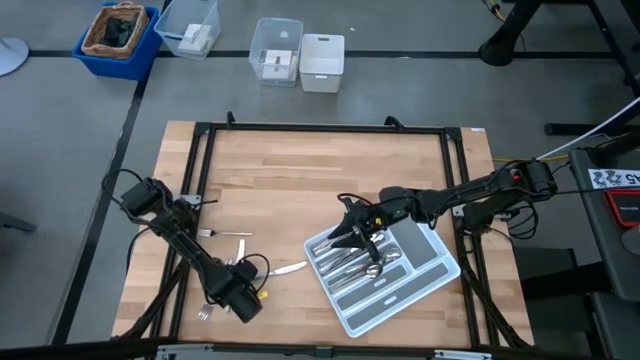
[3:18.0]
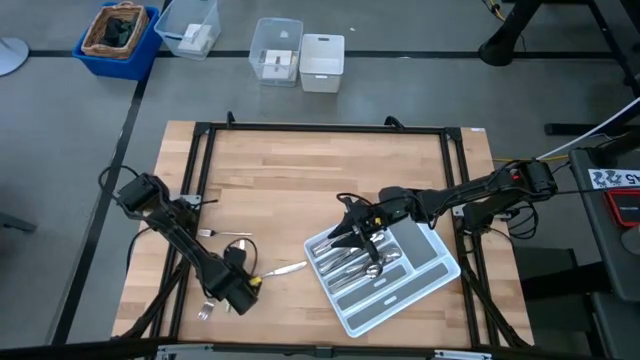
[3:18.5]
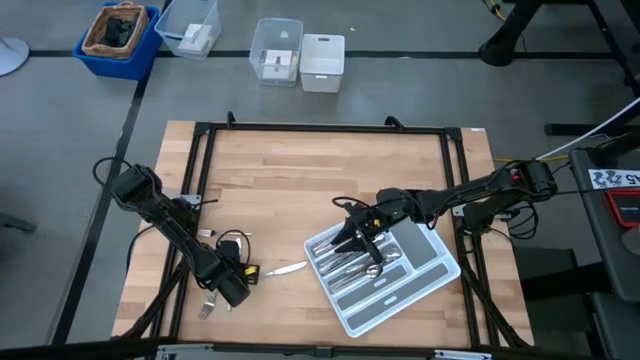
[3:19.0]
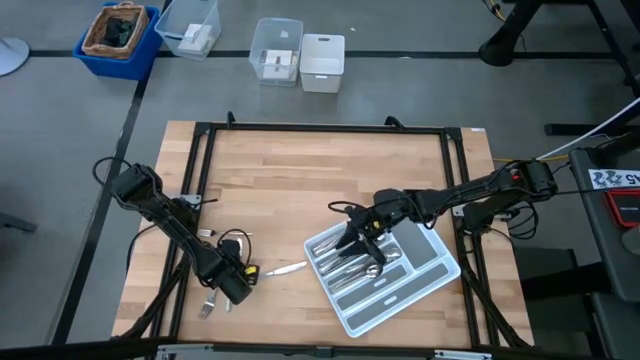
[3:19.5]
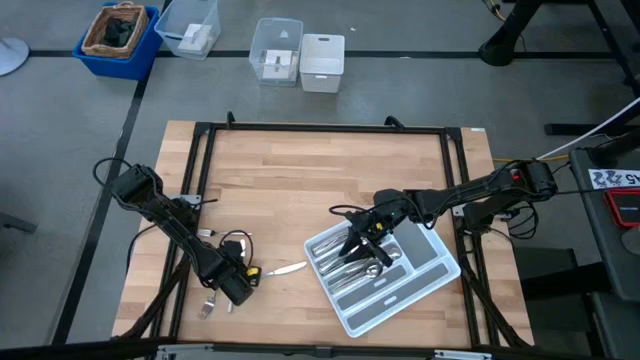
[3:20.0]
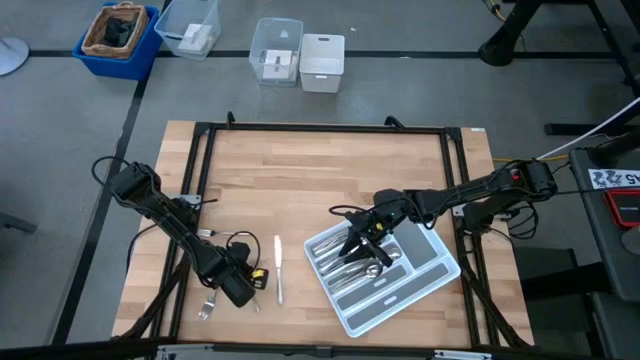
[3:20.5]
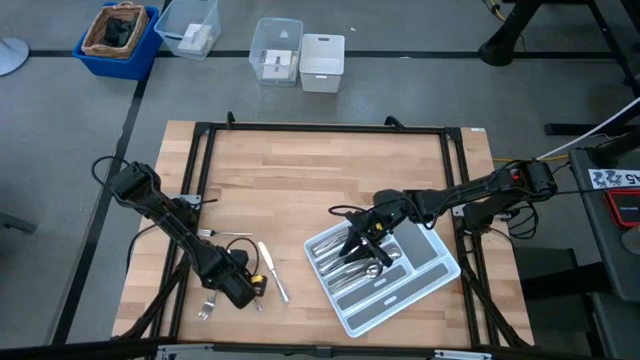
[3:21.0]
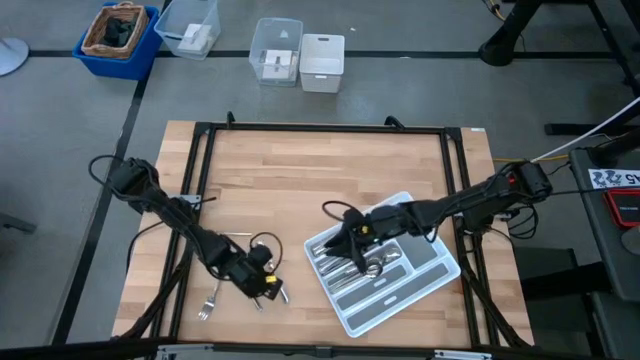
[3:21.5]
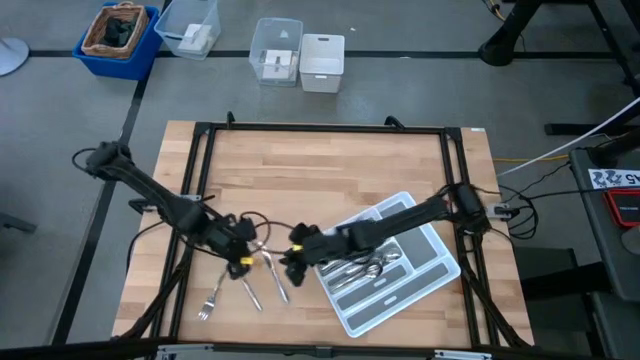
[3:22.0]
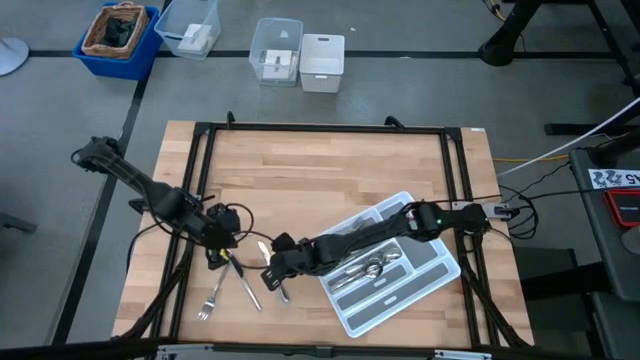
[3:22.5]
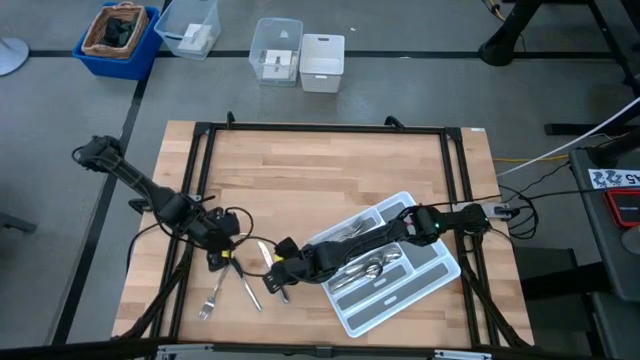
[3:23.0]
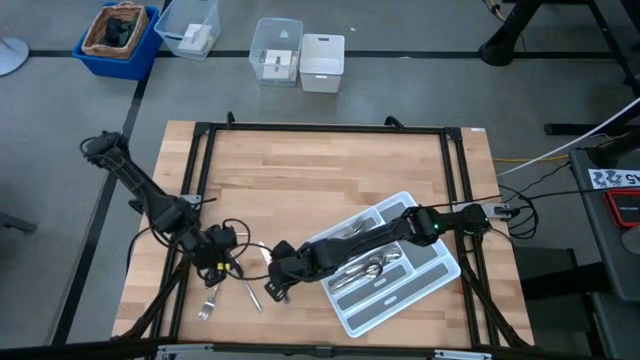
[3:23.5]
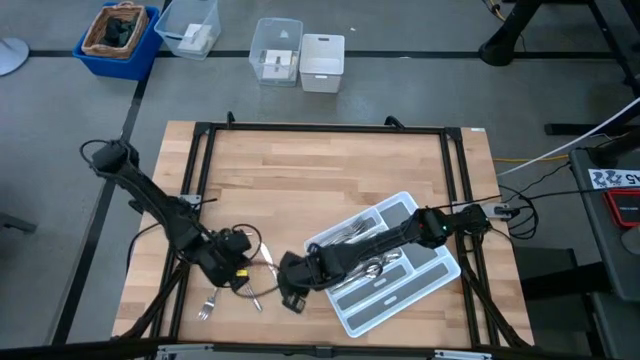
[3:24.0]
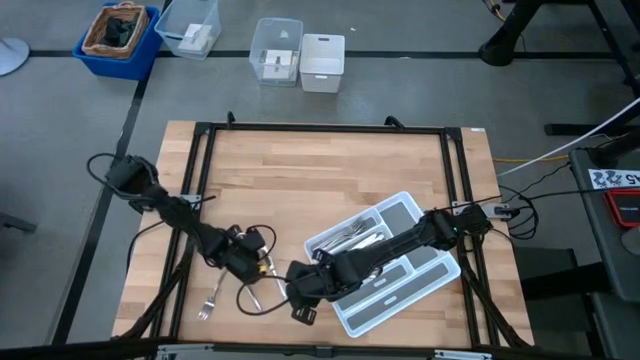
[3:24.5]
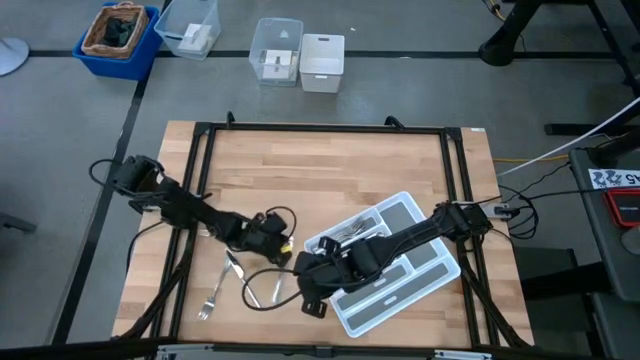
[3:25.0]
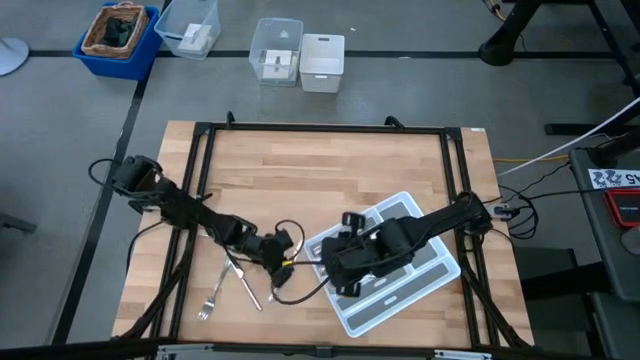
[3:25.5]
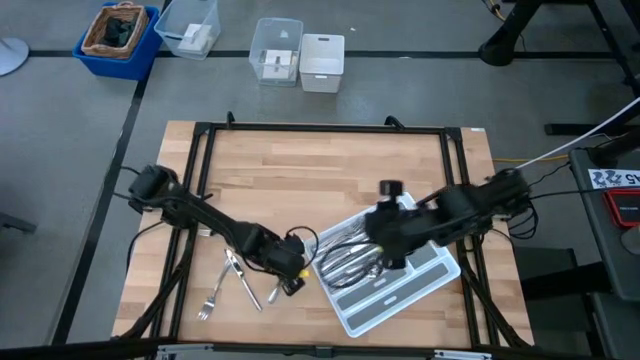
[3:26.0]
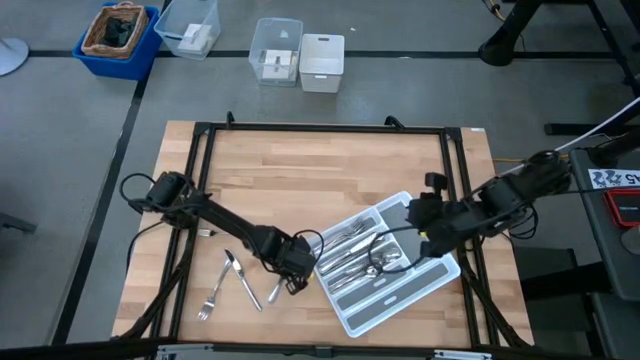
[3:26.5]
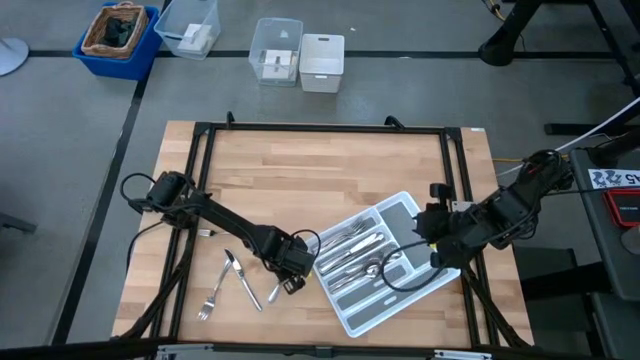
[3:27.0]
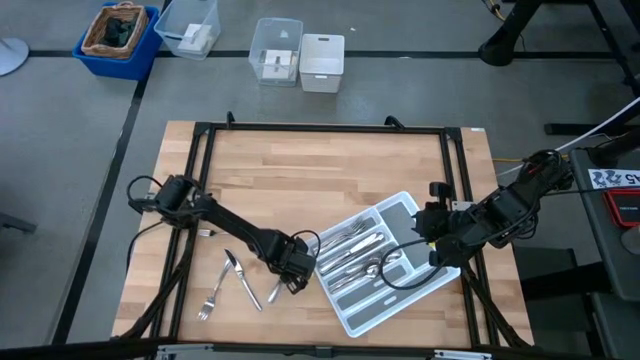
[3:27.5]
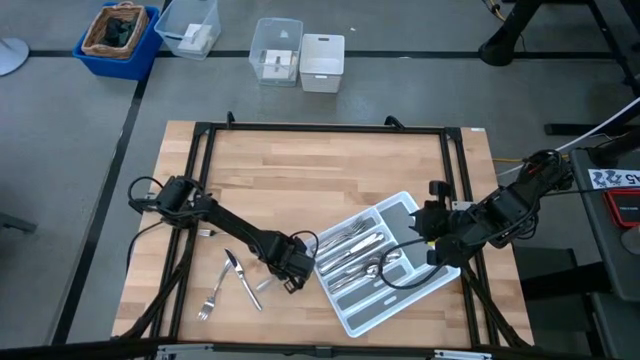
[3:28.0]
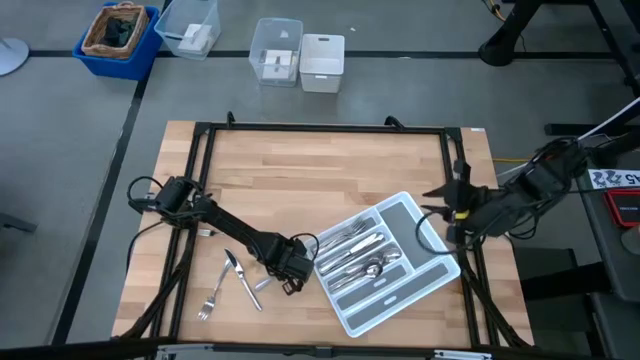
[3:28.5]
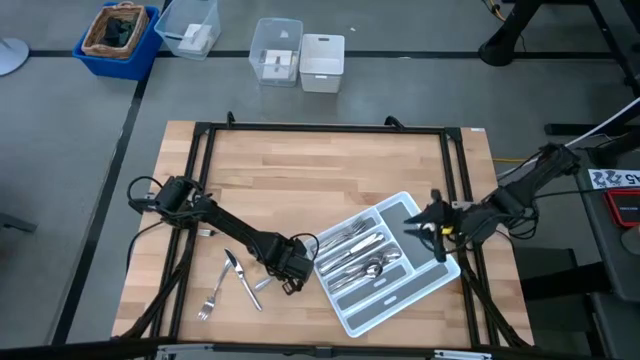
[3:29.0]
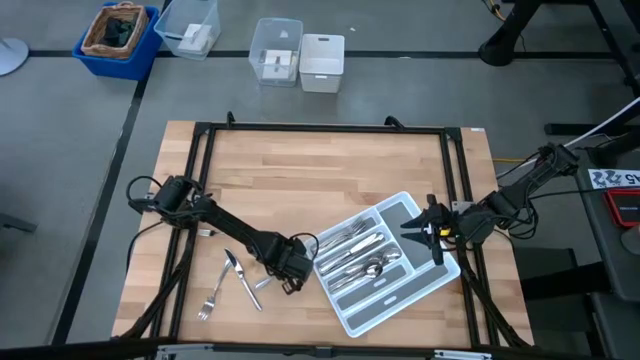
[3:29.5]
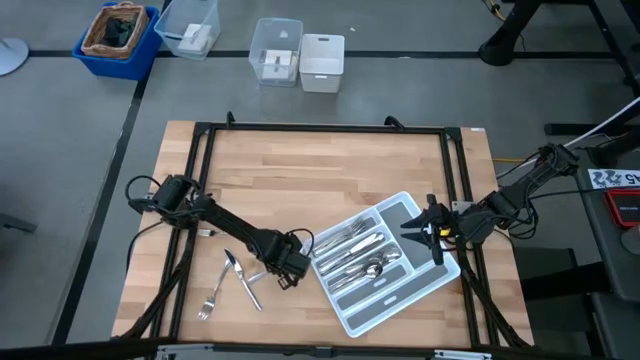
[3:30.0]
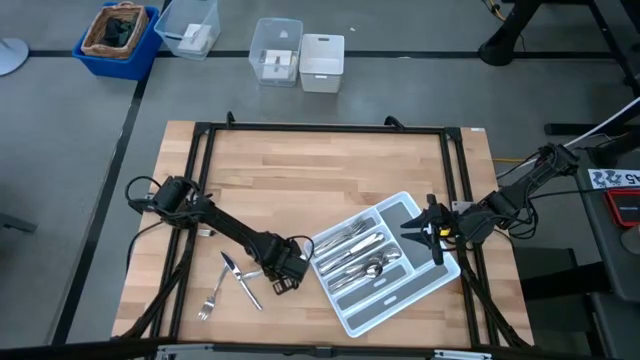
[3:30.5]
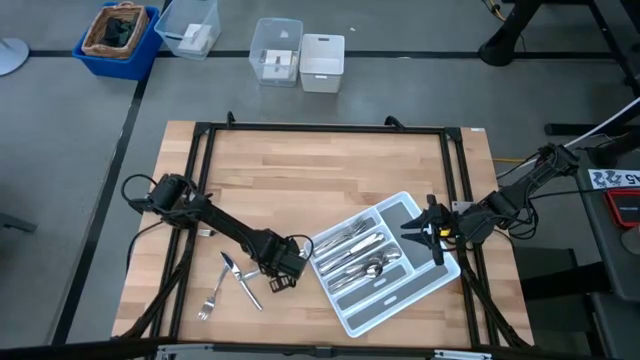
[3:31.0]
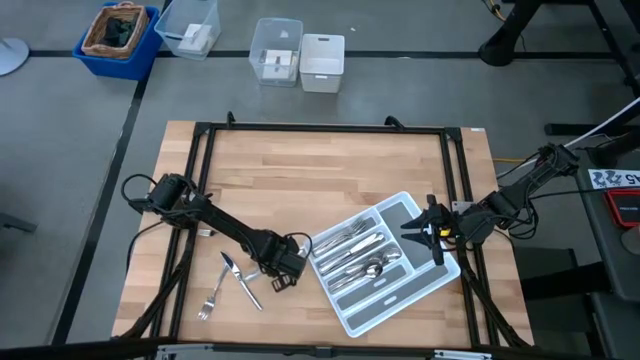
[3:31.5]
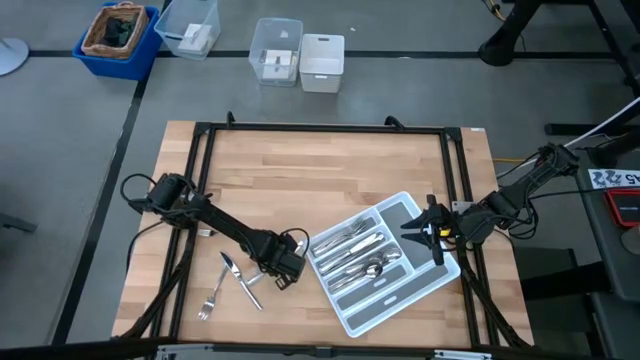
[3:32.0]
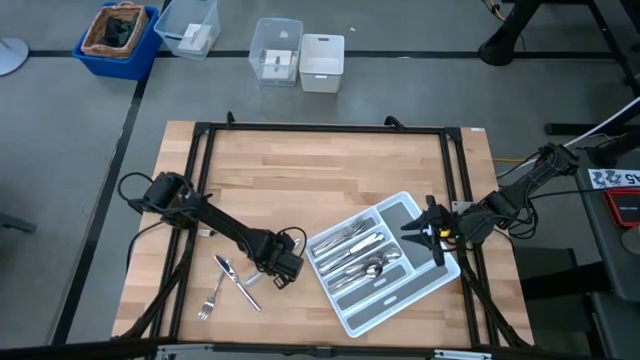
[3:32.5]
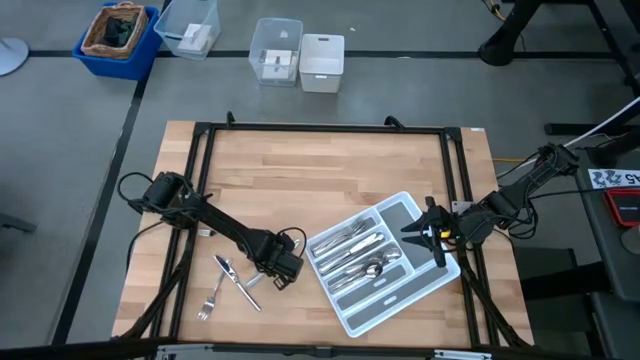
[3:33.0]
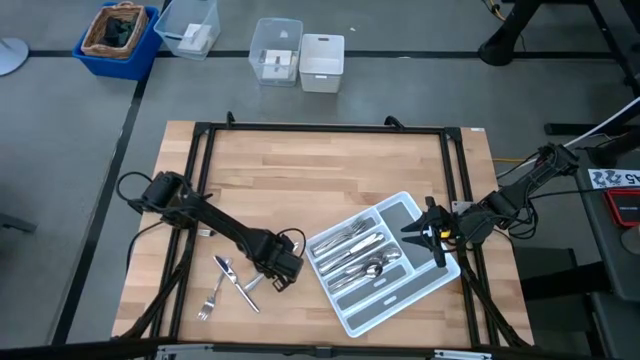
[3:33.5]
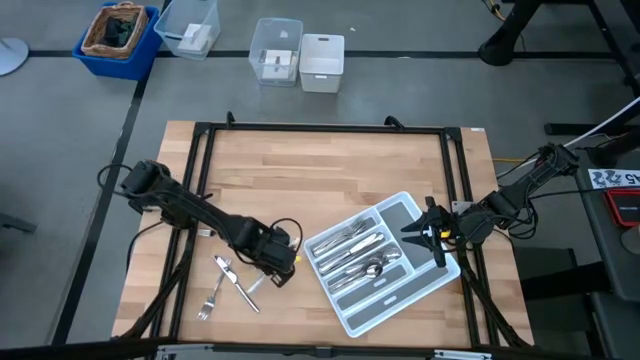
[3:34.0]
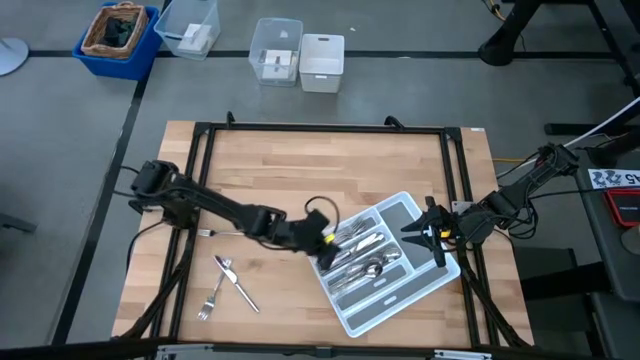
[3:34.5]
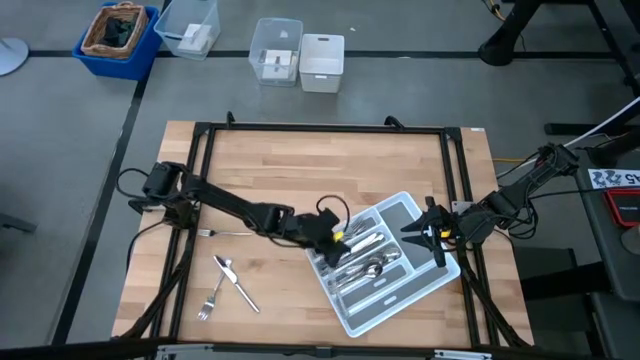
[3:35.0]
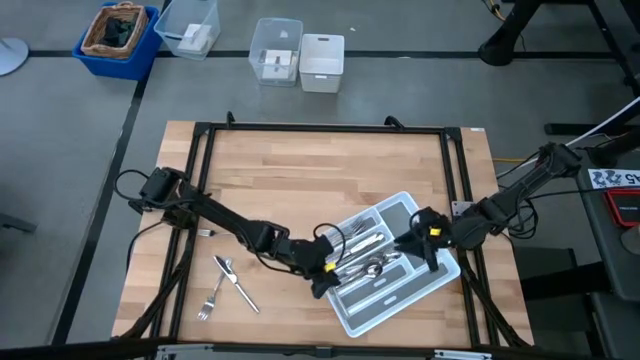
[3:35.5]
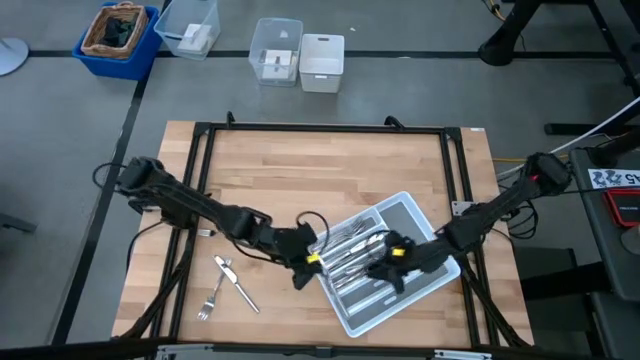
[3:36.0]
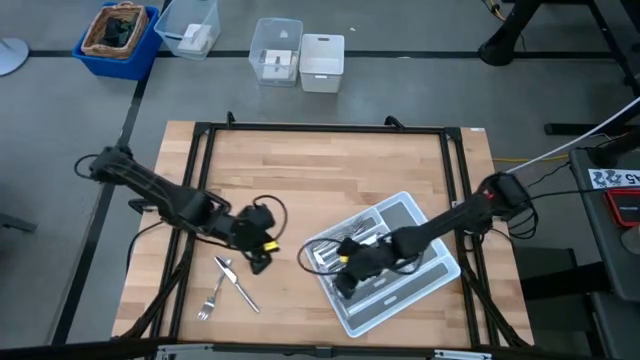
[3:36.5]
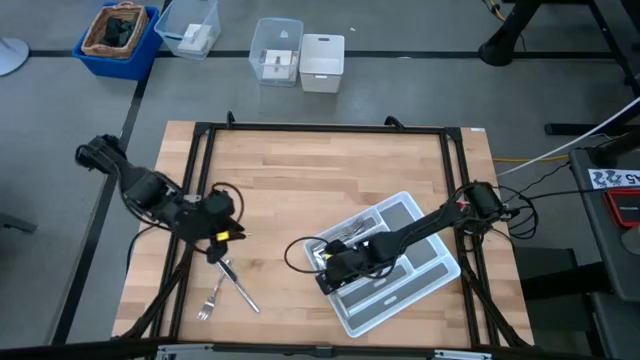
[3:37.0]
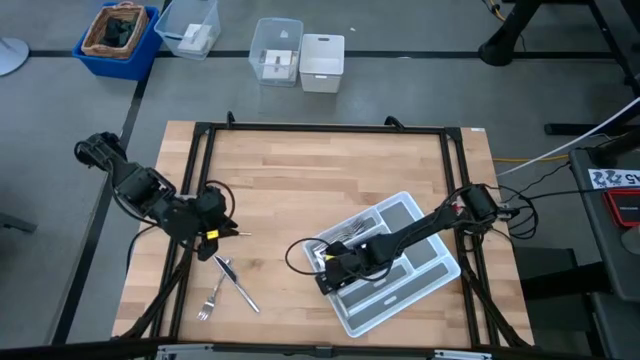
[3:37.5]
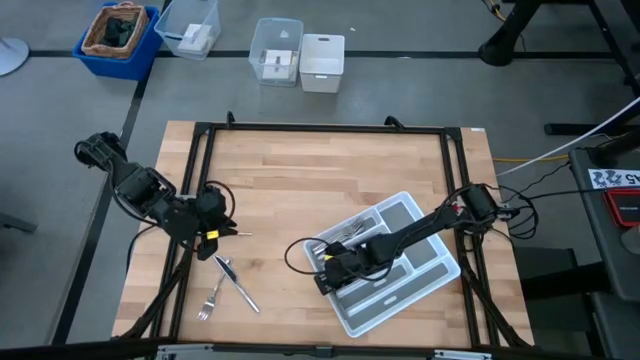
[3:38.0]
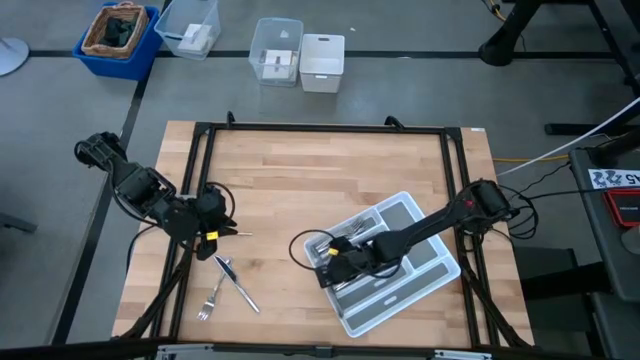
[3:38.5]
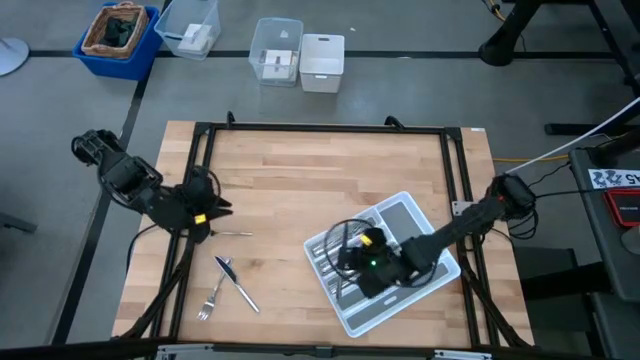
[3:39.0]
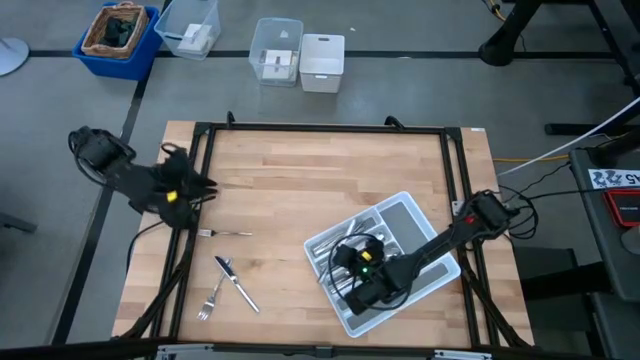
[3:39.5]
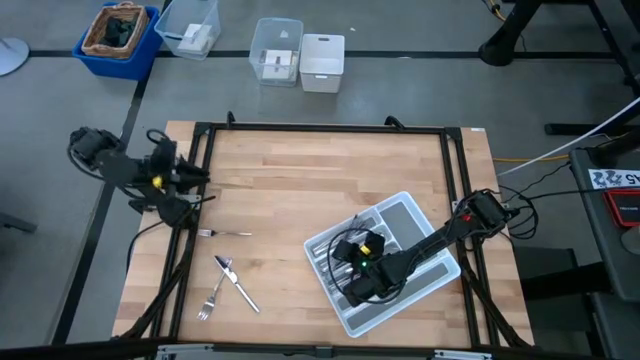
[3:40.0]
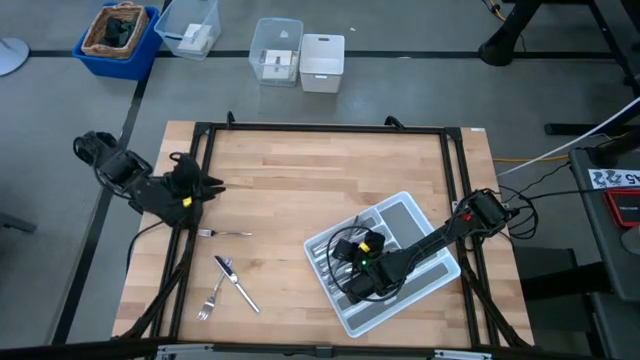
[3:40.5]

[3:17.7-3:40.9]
Task: Sort silverware
Put the silver table knife into the silverware tray
